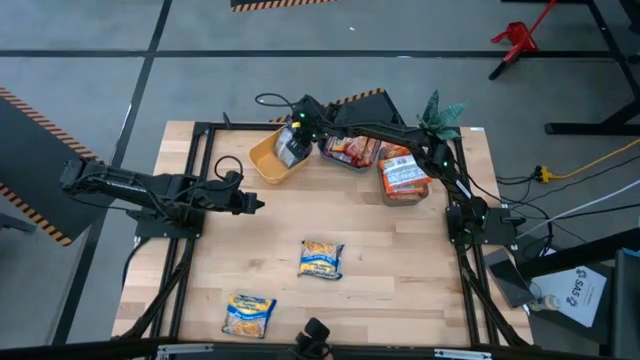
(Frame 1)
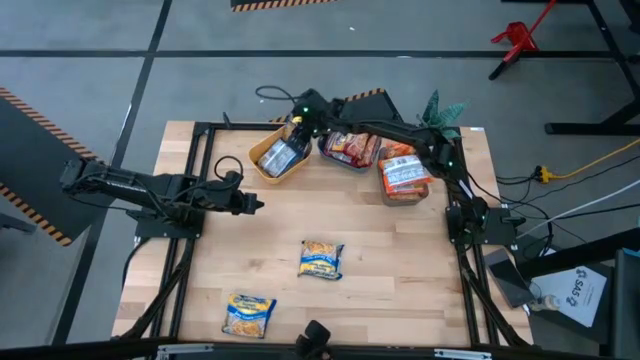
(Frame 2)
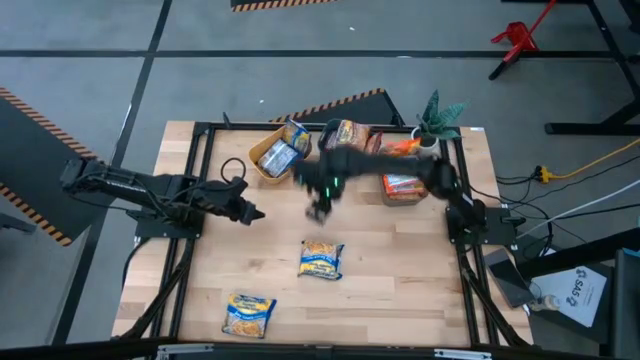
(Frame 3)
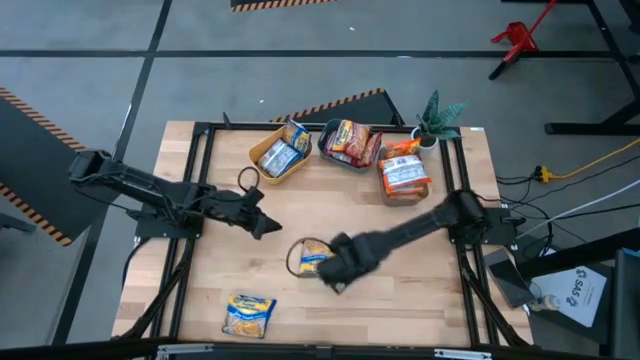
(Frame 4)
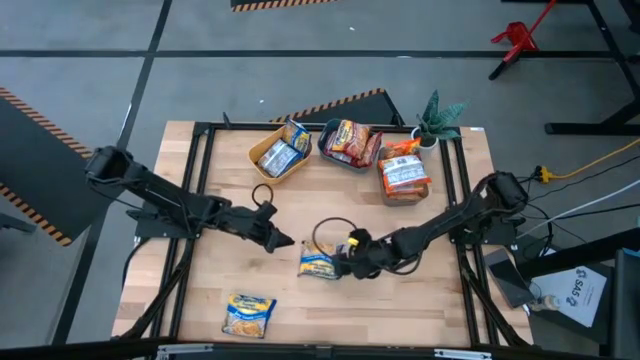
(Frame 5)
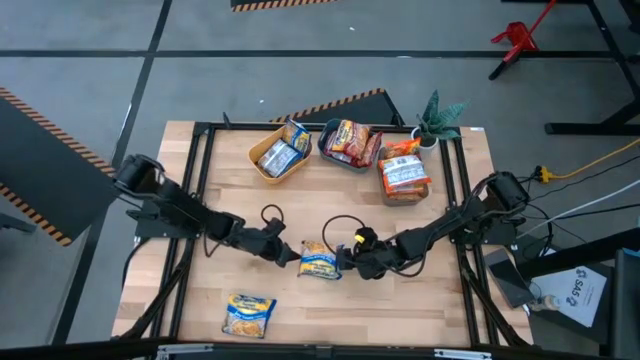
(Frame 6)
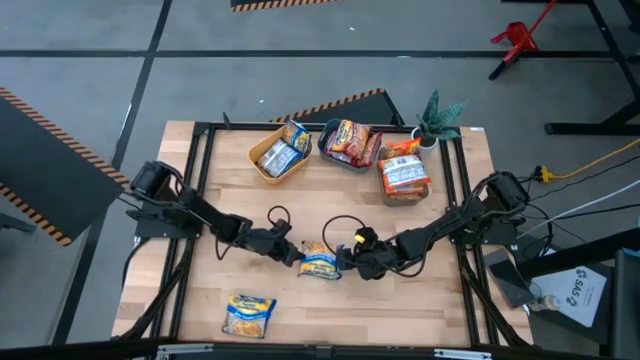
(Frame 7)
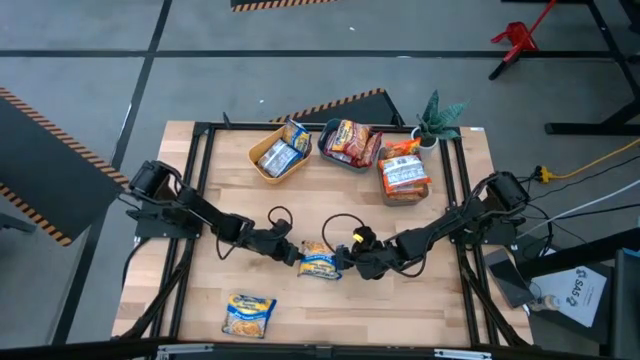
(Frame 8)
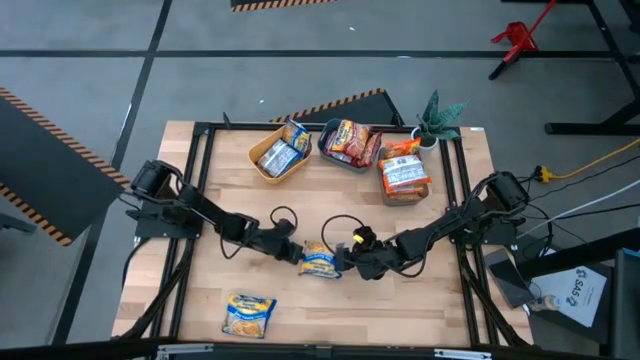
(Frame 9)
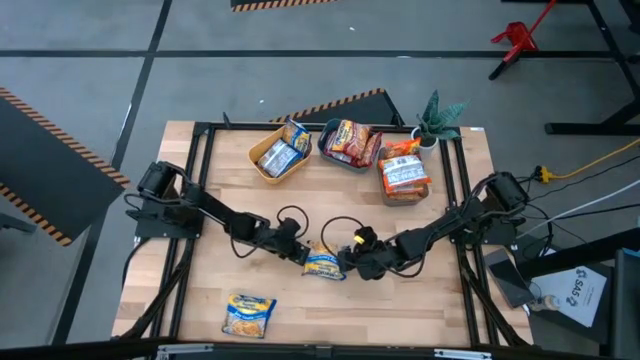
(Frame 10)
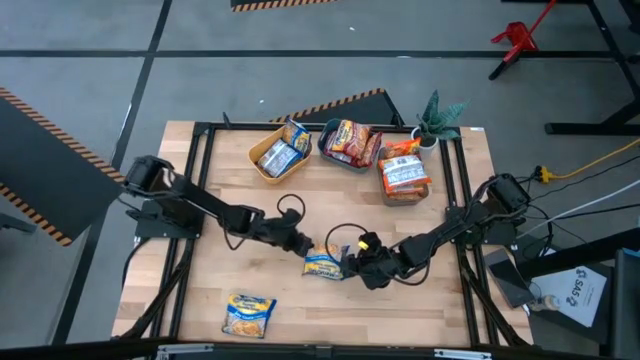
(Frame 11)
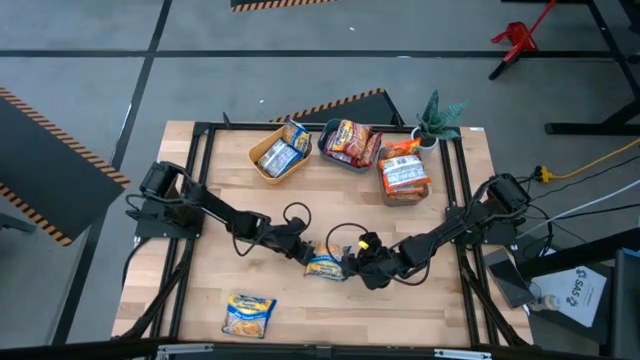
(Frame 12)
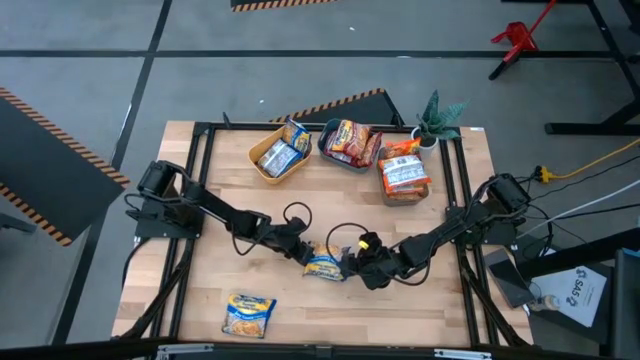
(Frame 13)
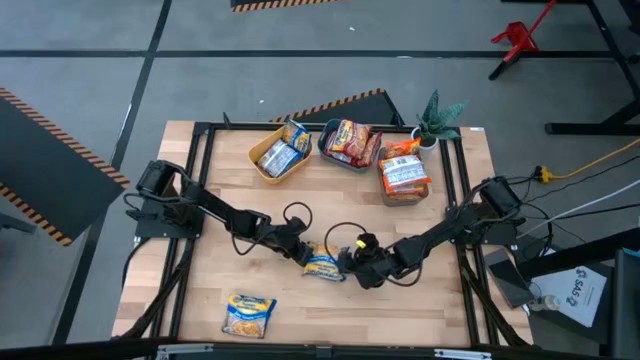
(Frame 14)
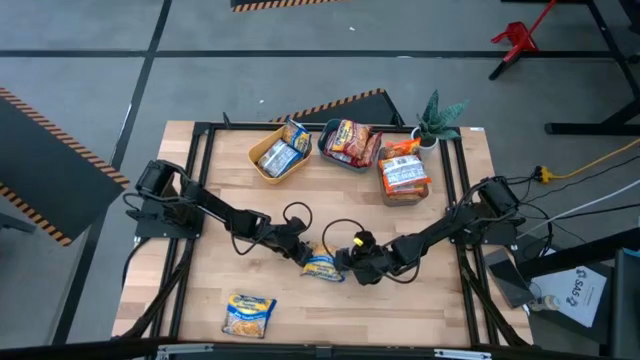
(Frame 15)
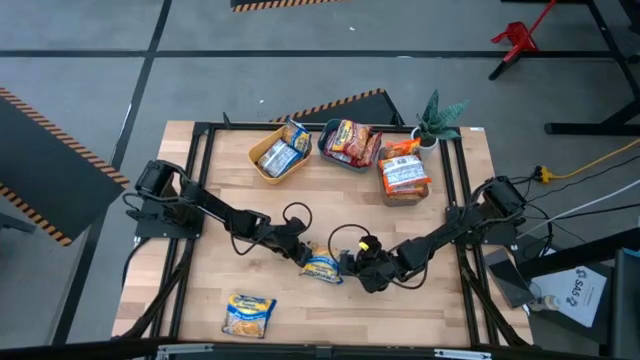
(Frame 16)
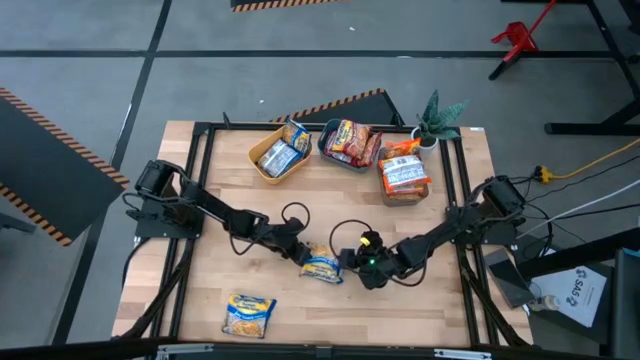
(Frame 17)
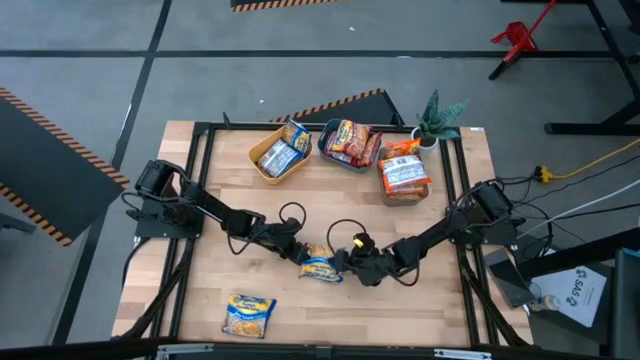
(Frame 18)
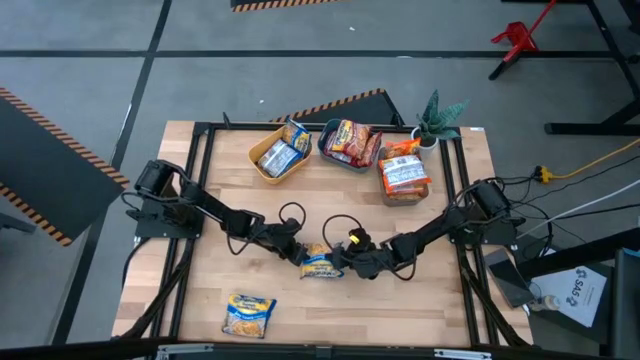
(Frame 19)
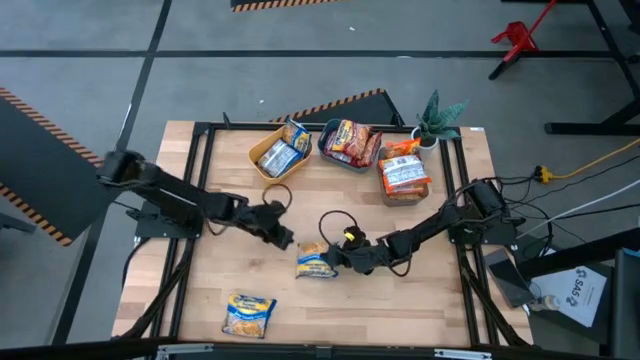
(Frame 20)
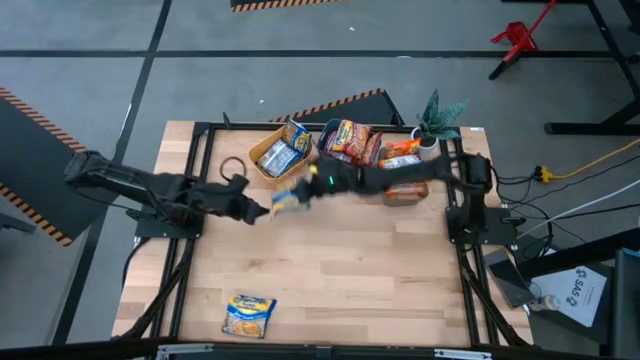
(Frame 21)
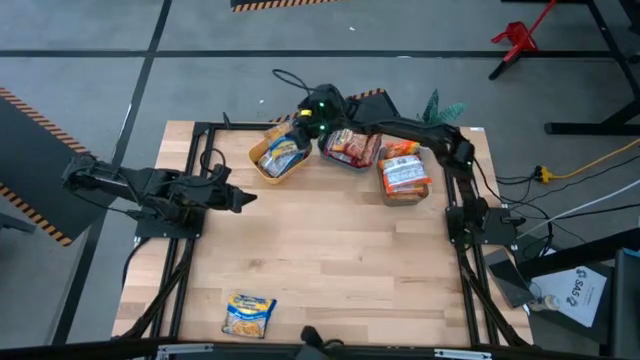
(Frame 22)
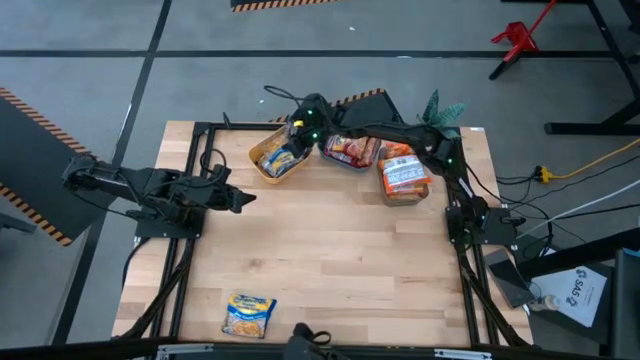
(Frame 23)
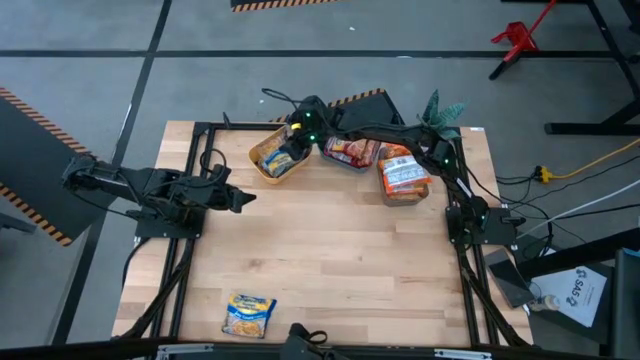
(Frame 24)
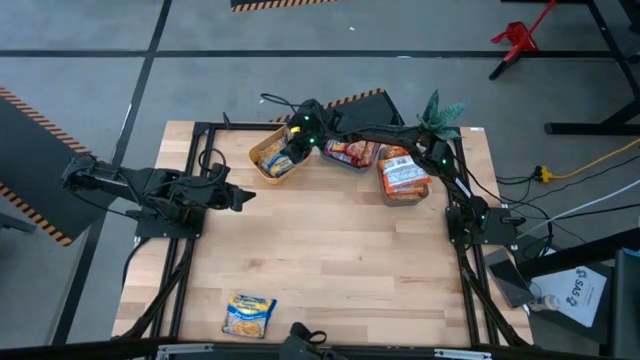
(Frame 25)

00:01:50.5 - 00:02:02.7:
Task: Sort Maruchan noodles
Put the top blue noodle pack into the yellow bin

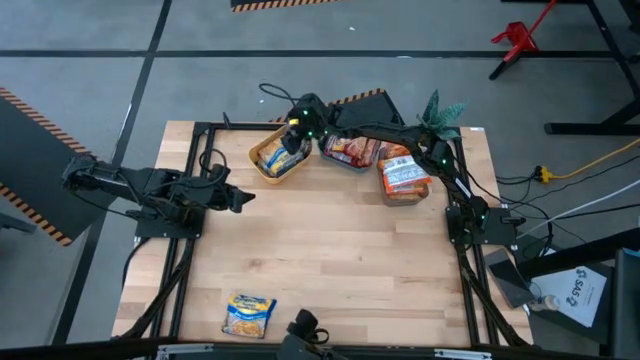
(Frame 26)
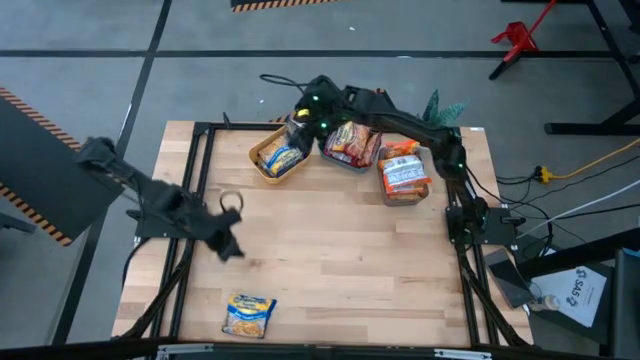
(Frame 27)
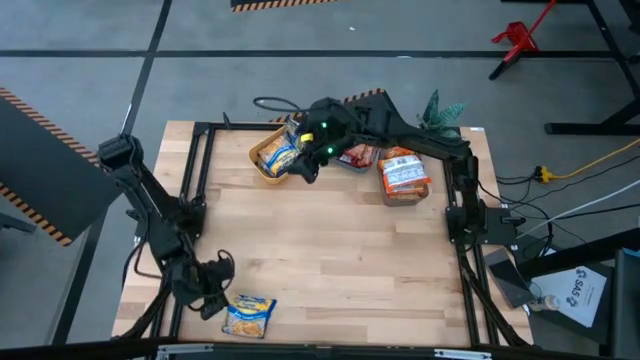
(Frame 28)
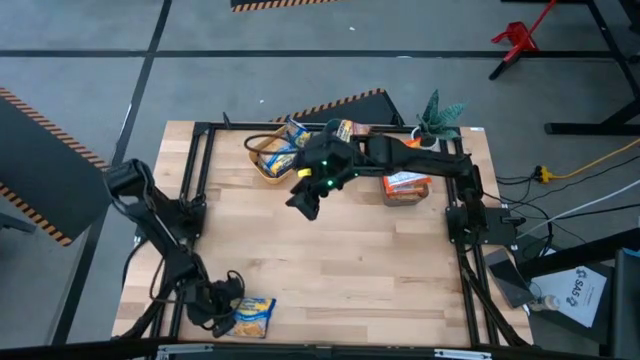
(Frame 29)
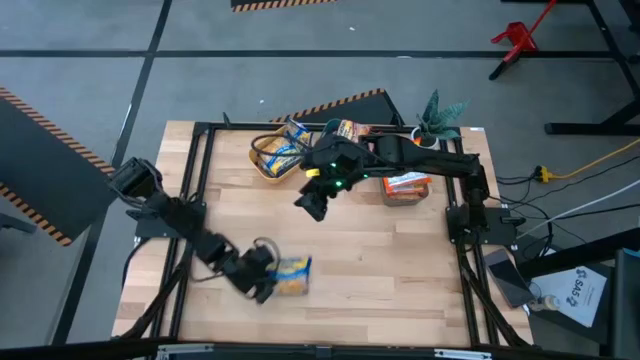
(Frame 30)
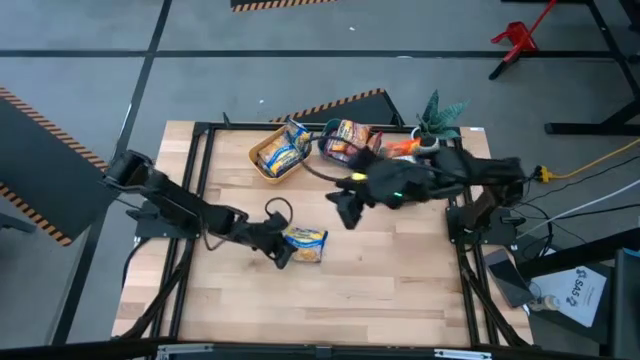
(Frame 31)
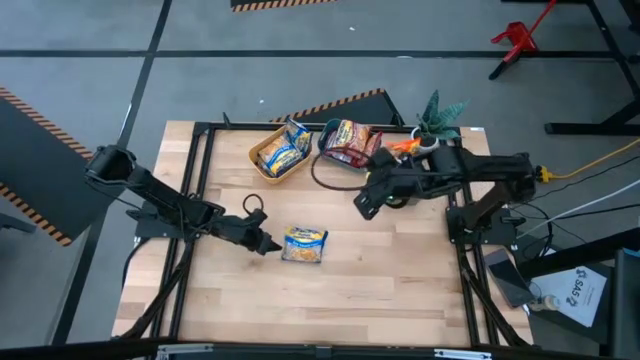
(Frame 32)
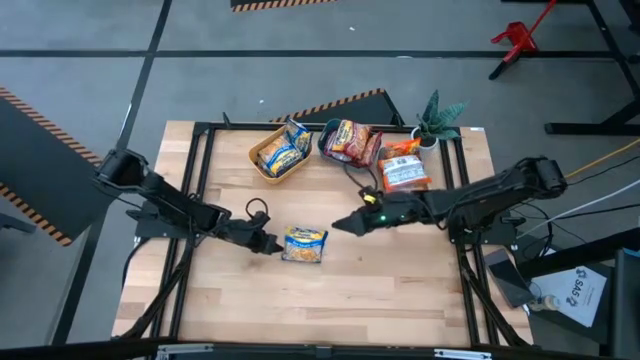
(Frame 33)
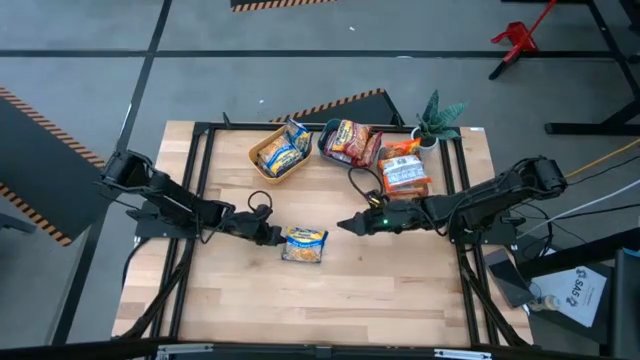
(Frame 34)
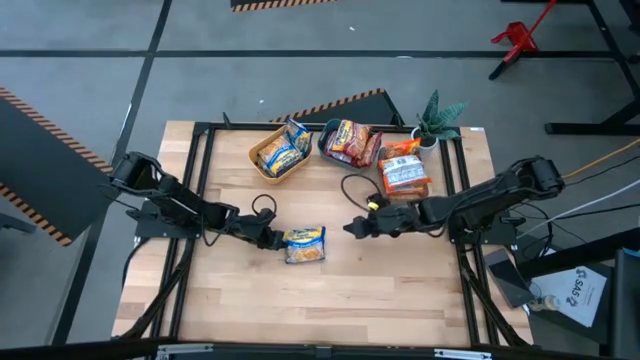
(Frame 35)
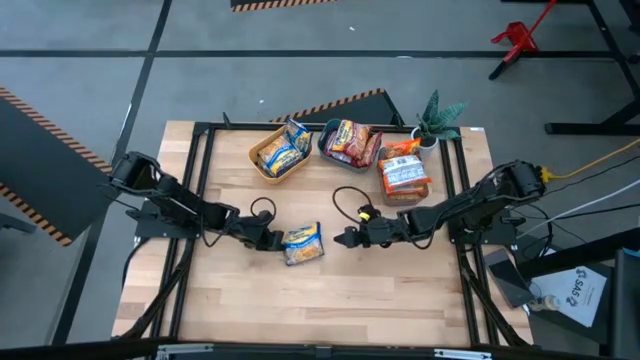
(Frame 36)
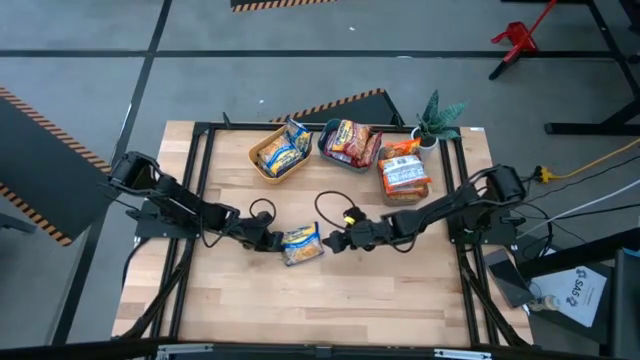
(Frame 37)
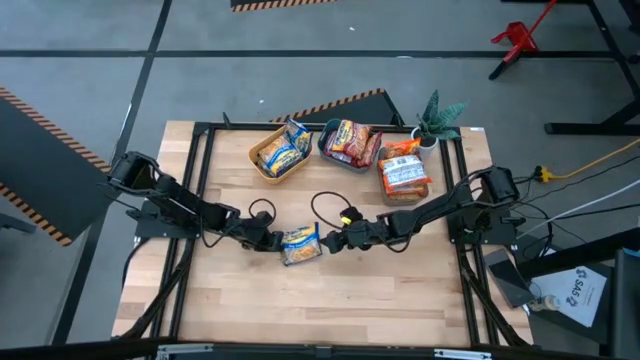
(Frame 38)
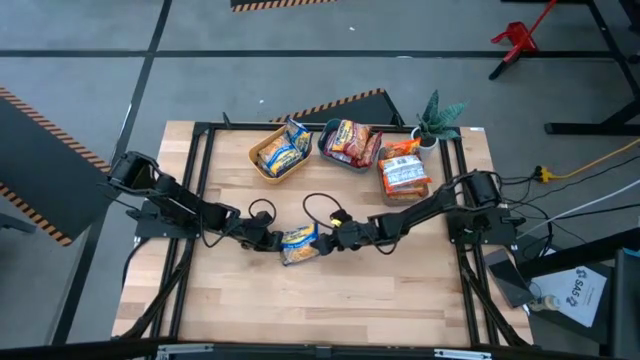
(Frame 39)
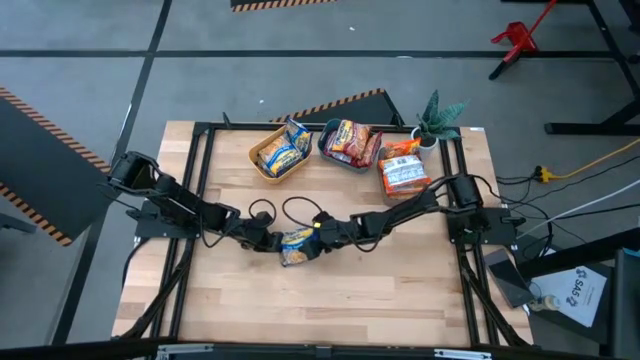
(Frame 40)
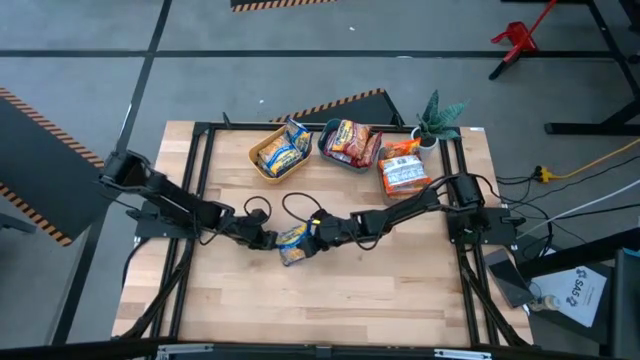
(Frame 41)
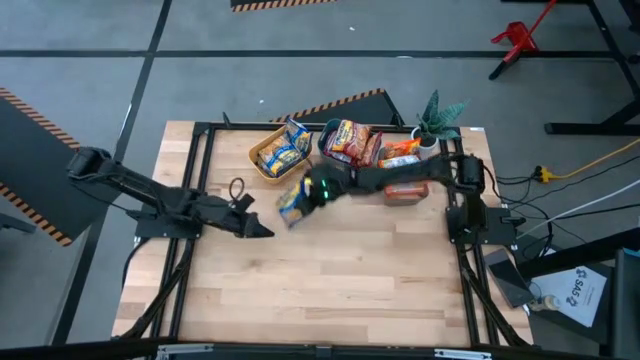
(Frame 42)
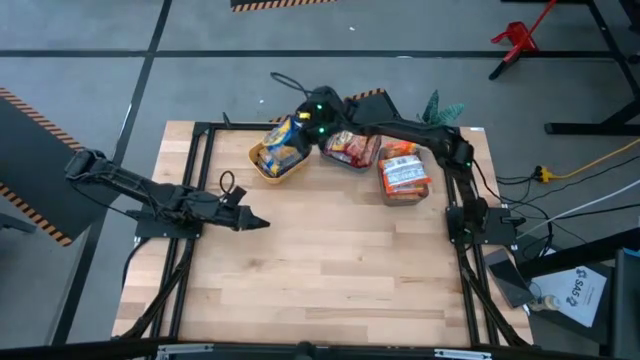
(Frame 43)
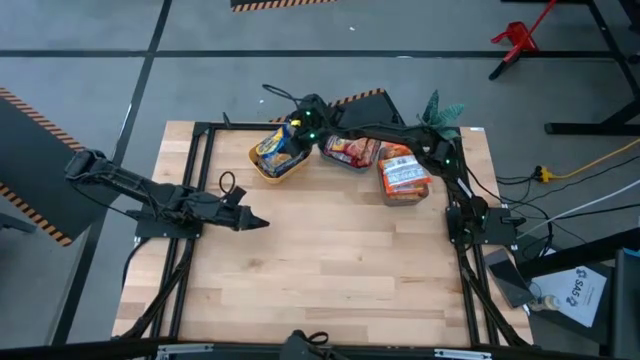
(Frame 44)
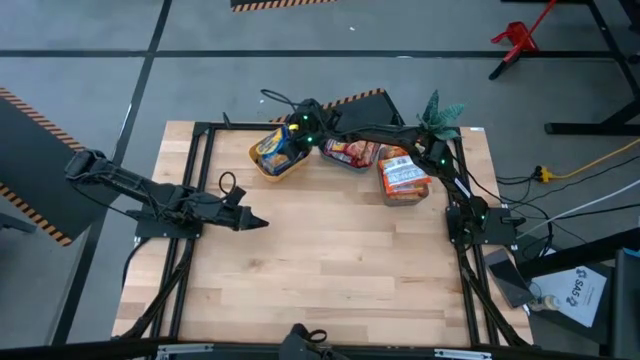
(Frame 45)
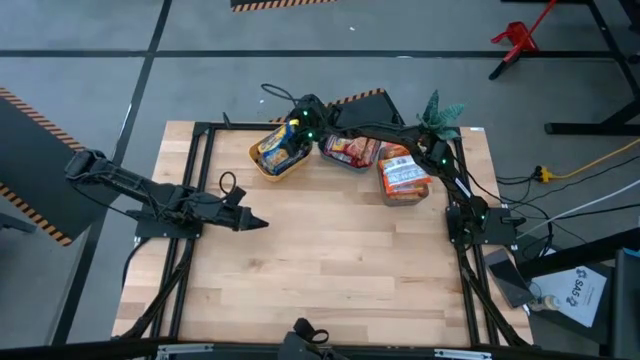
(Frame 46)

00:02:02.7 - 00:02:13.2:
Put the blue noodle pack into the yellow bin
